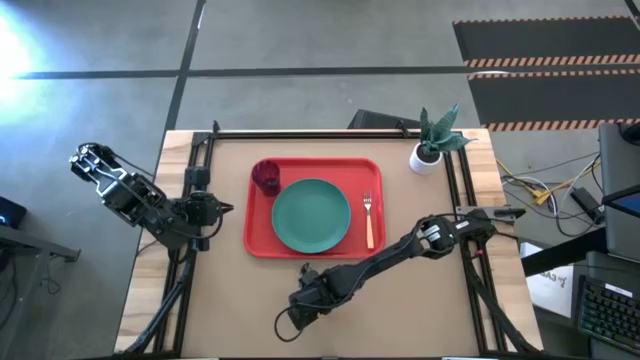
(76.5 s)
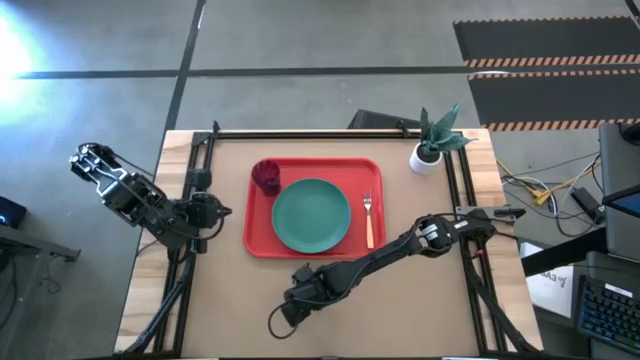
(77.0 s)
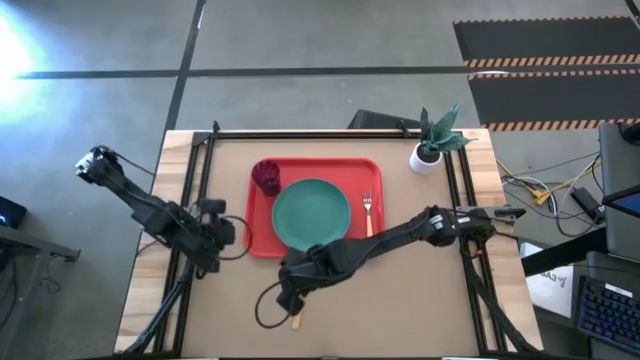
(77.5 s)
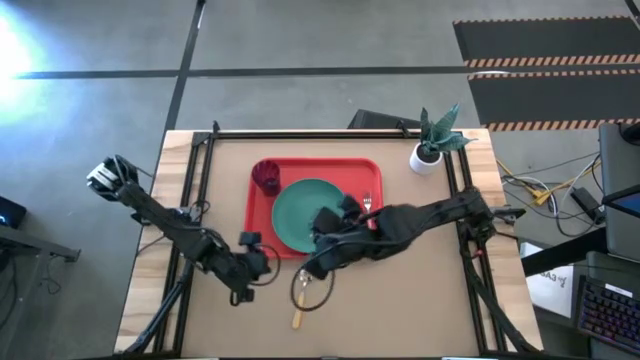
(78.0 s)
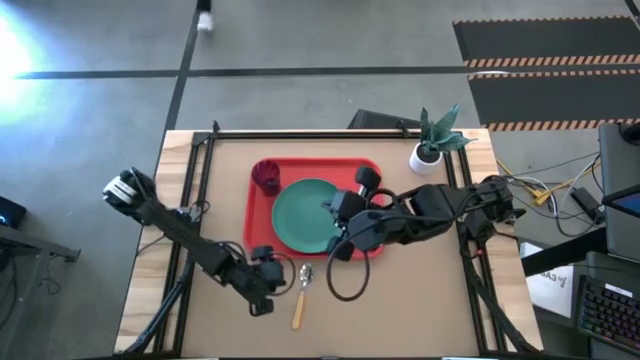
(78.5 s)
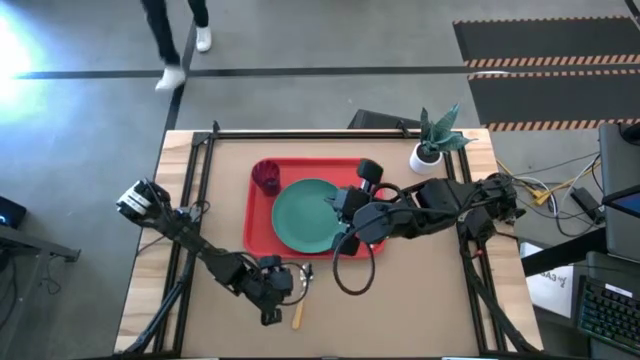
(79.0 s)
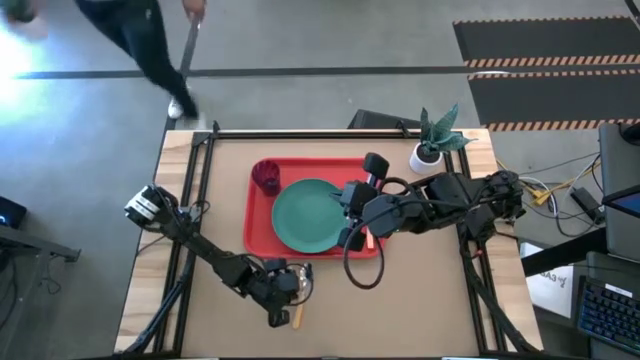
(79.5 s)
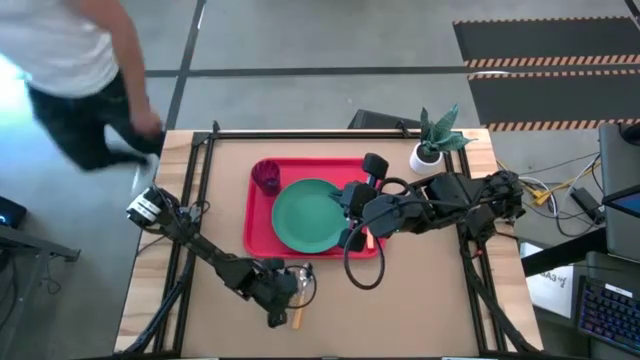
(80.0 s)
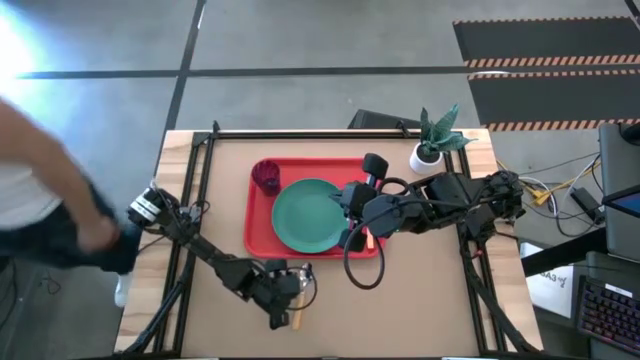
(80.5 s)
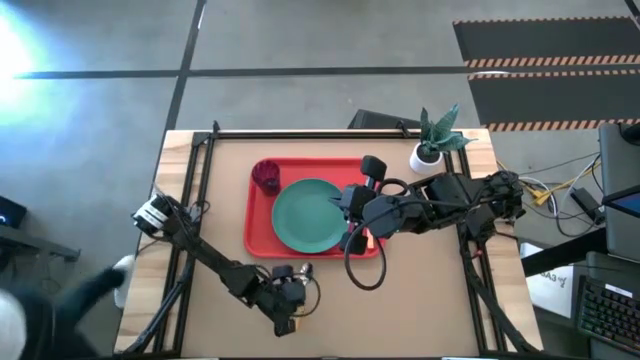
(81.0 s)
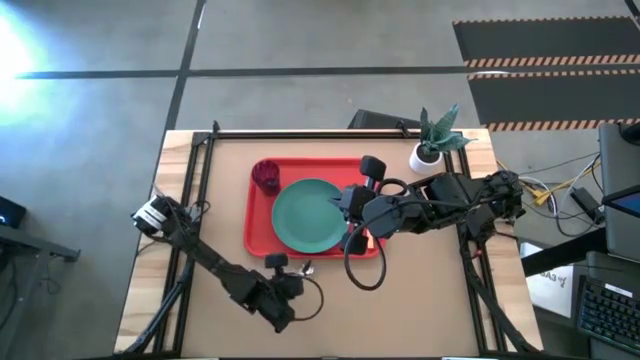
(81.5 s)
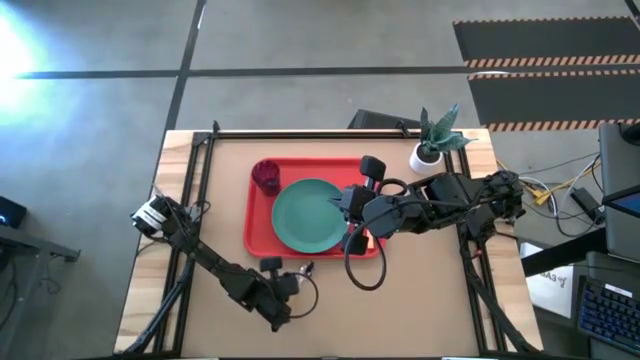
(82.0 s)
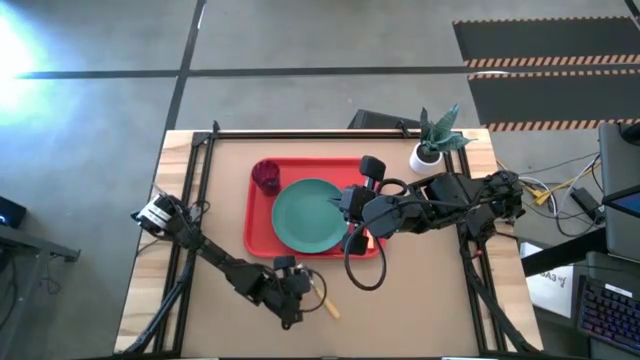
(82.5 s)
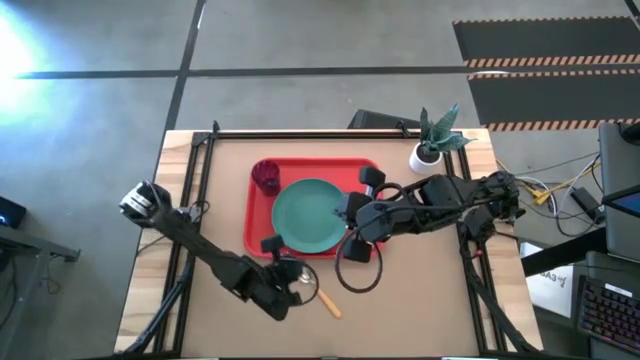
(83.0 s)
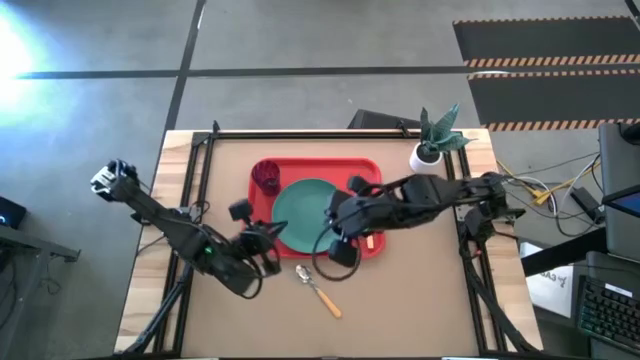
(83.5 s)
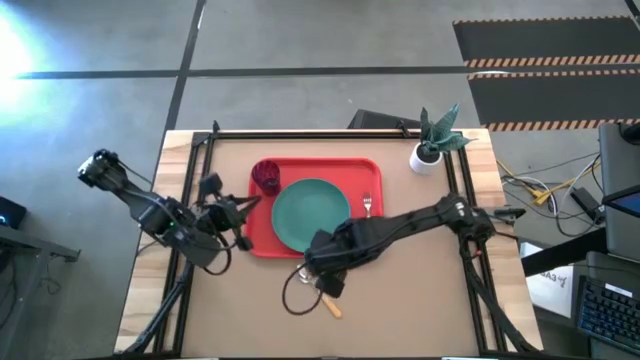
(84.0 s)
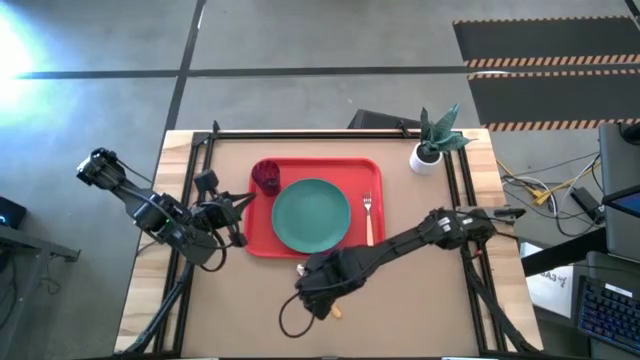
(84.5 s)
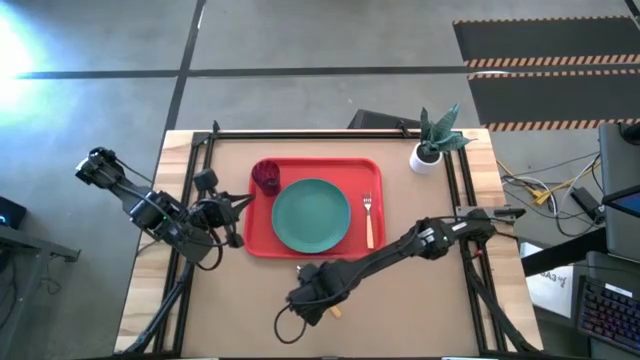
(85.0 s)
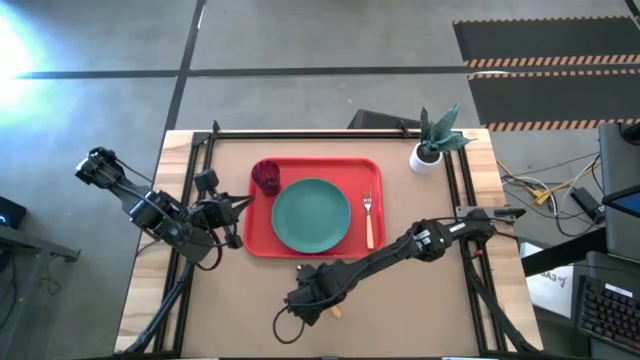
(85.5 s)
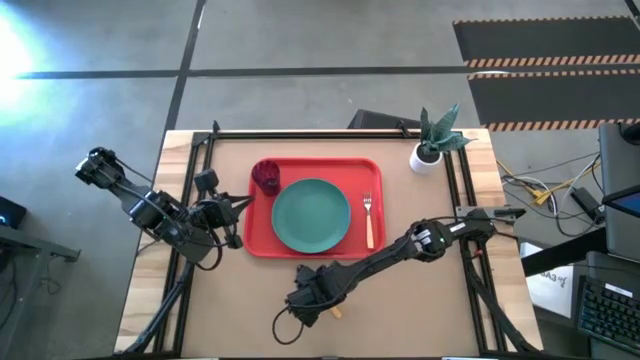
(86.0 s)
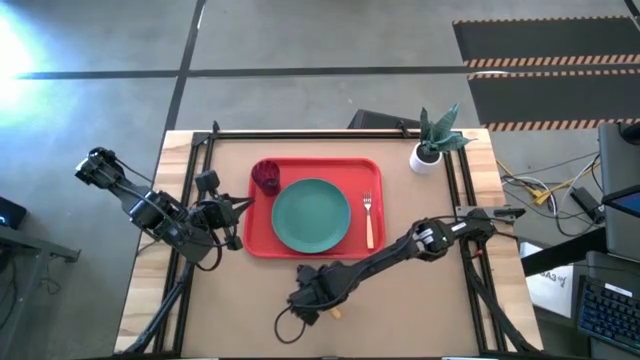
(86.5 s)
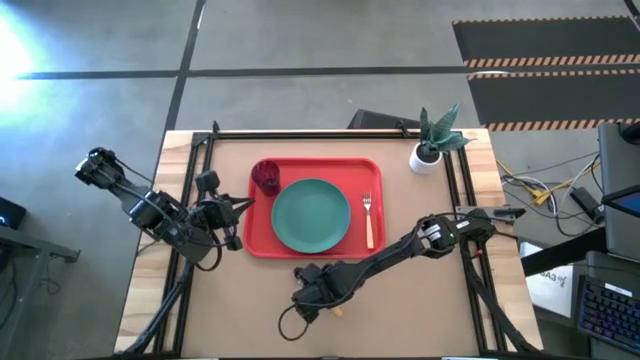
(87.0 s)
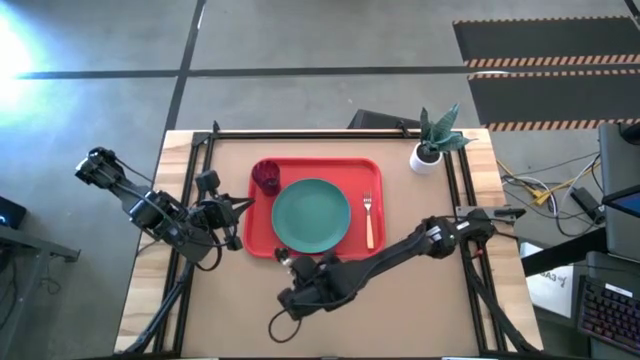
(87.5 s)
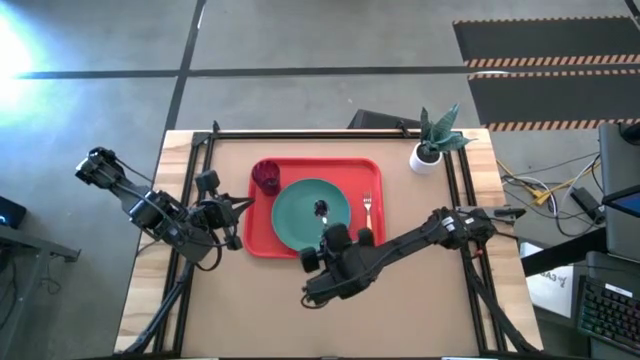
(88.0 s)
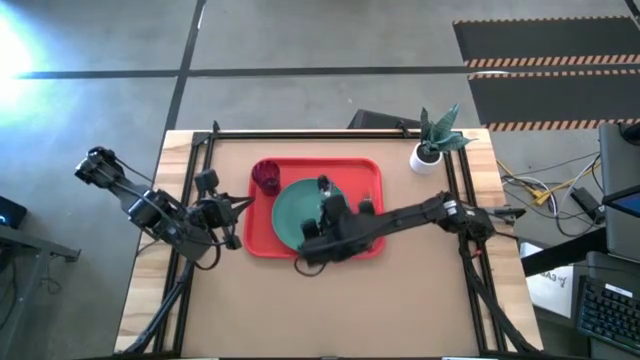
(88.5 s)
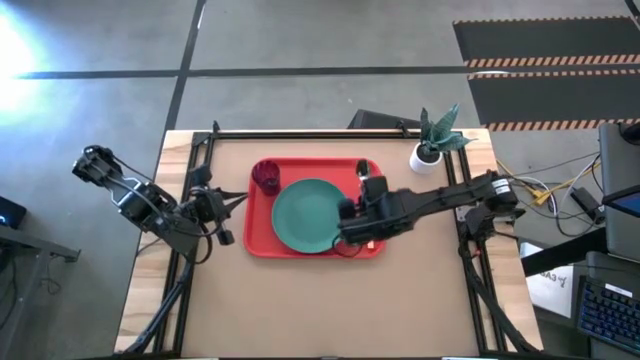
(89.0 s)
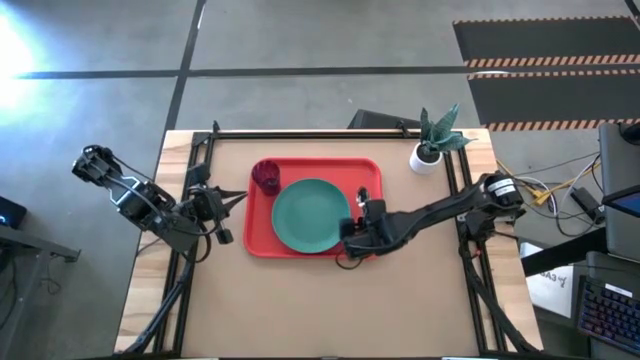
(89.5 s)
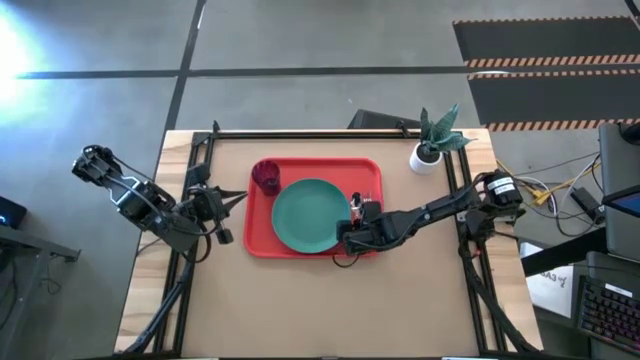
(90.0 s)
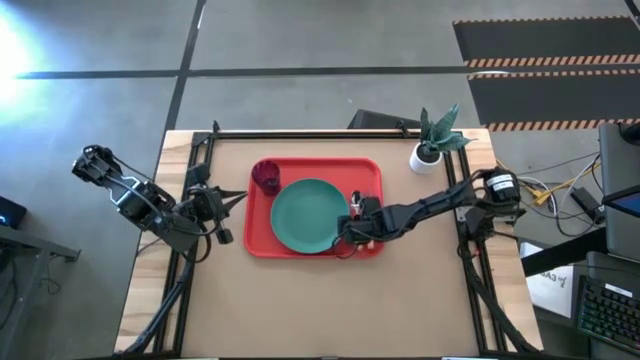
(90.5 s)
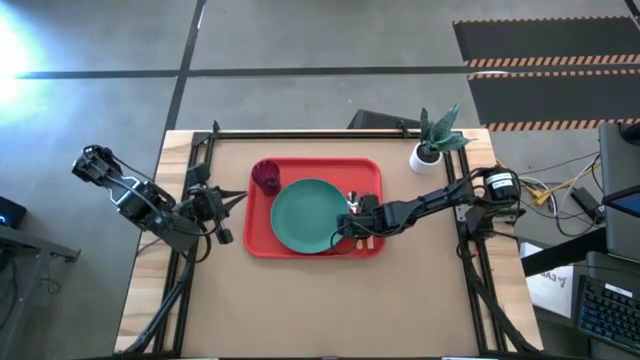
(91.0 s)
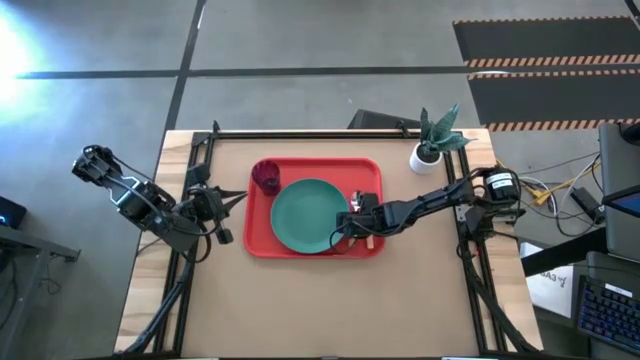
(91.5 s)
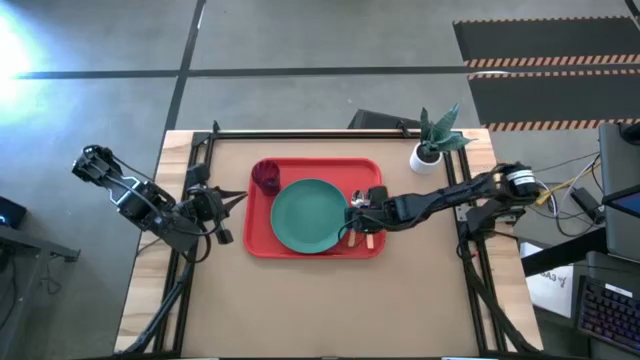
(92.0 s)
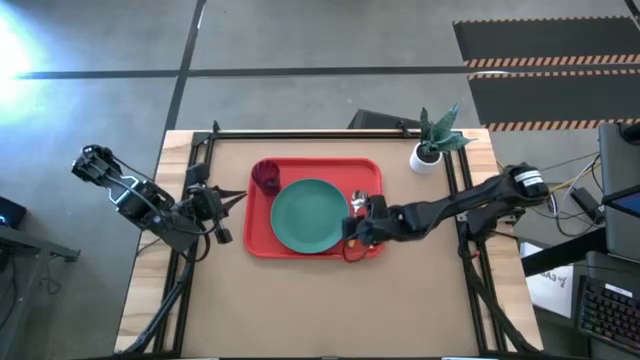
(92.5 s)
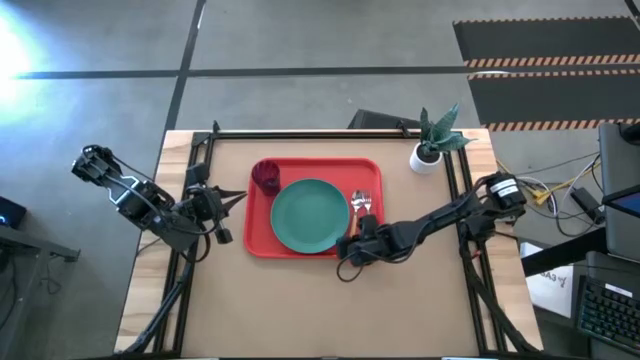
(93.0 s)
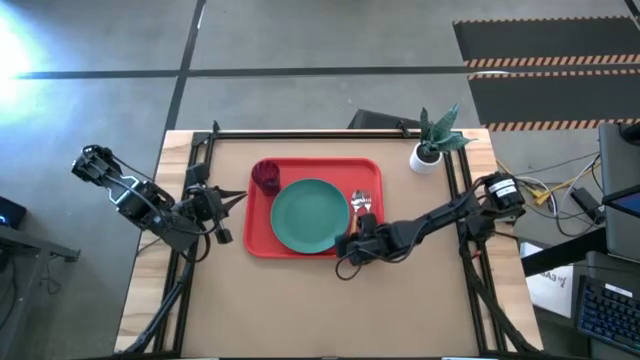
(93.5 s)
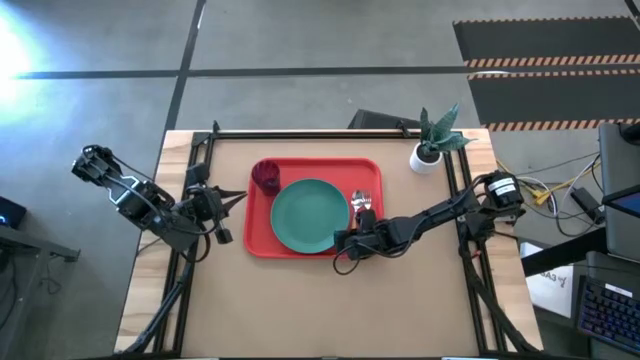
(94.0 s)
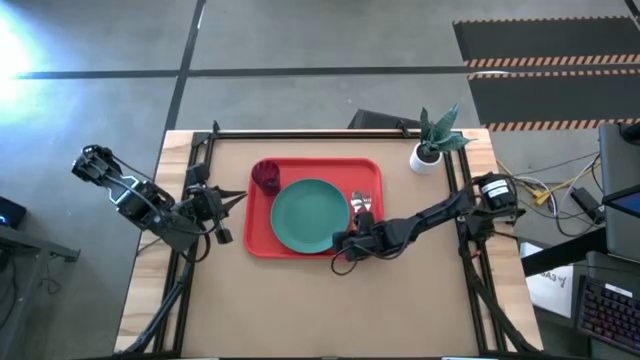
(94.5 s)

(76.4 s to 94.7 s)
Task: Pick and place plate/cup/fork/spoon on tray
Put the orange spoon to the left side of the orange fork on the orange tray

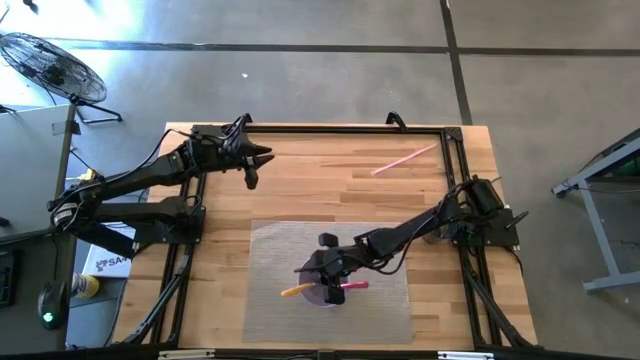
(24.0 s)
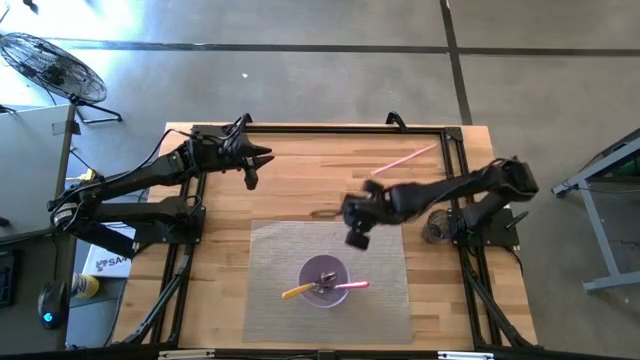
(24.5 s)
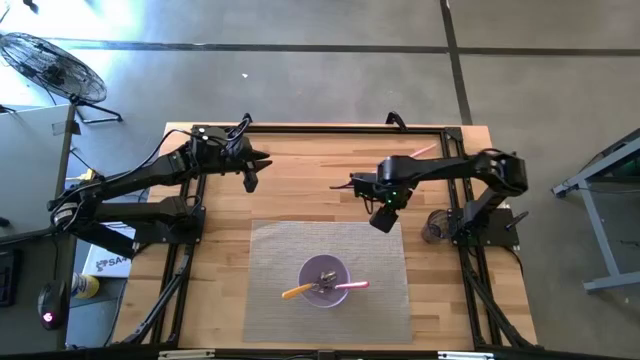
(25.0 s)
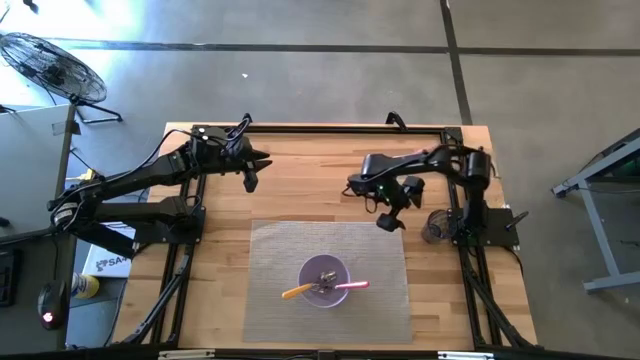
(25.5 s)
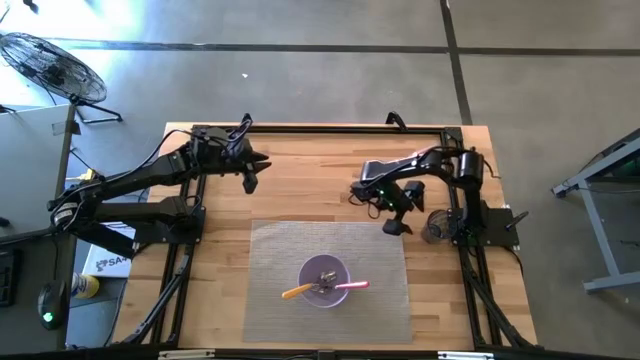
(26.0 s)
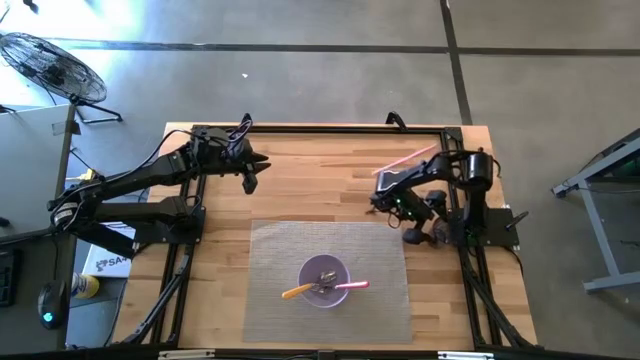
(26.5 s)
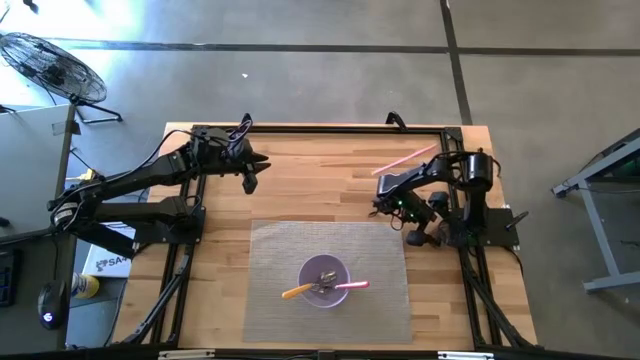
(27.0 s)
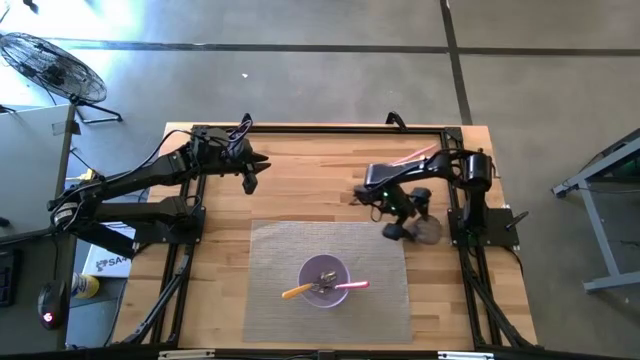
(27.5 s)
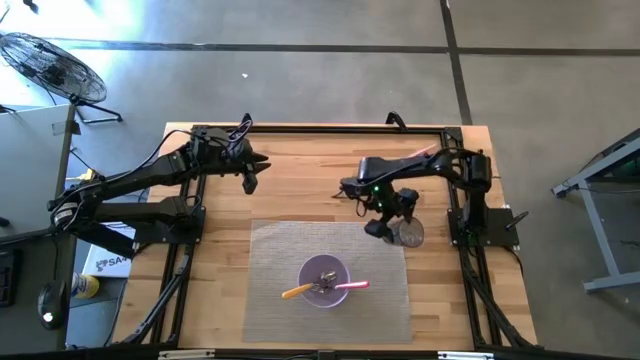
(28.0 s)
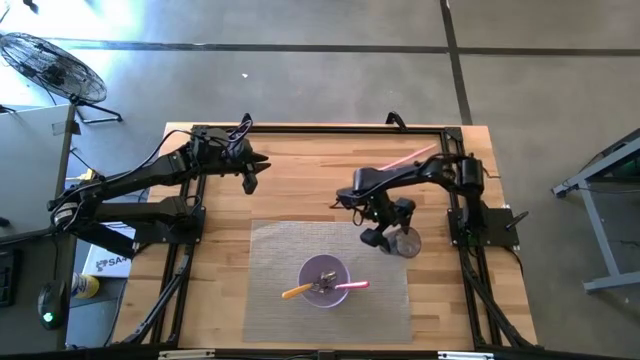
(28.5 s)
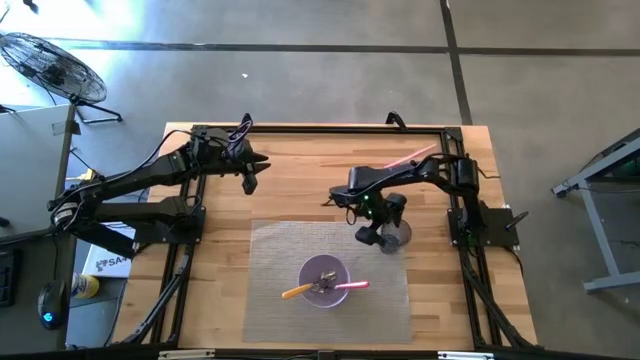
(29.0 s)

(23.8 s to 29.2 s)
Task: Pick & Place Utensil
Put the blue cup to the top right of the purple bowl on the gray mat
